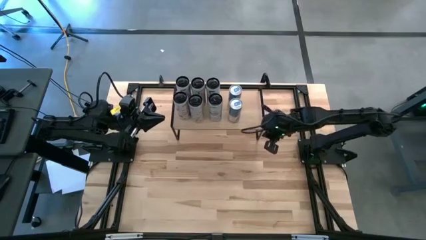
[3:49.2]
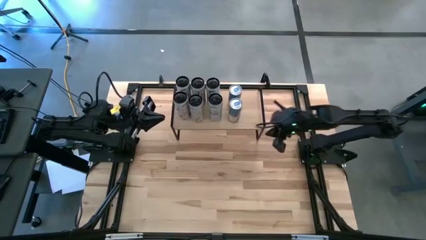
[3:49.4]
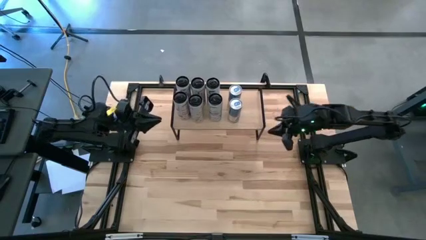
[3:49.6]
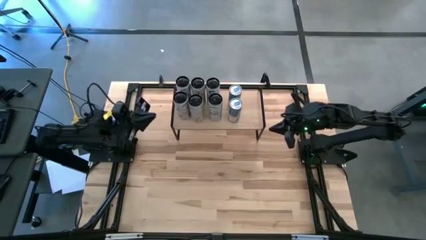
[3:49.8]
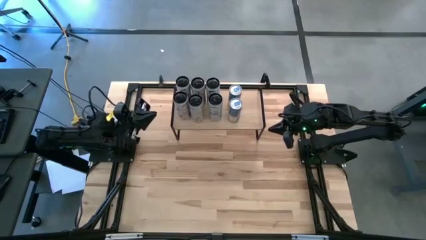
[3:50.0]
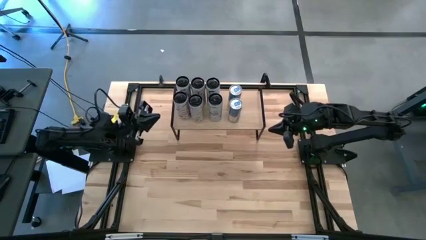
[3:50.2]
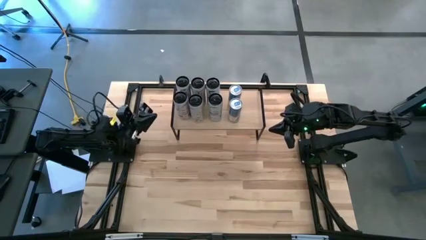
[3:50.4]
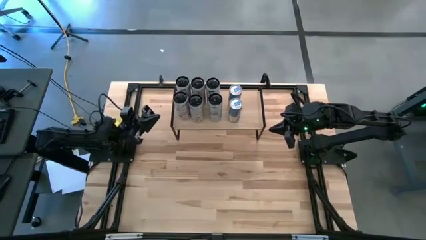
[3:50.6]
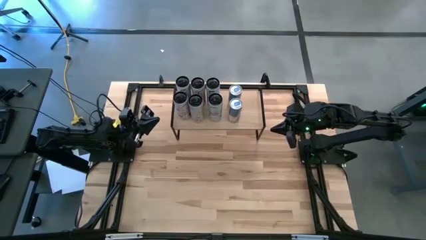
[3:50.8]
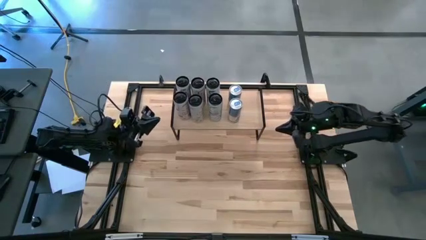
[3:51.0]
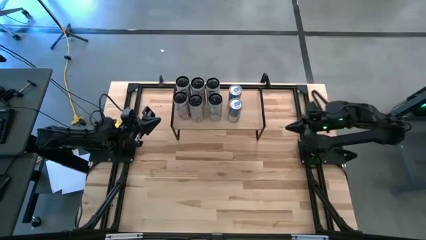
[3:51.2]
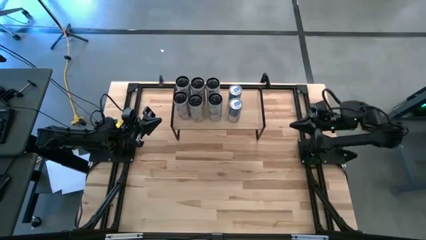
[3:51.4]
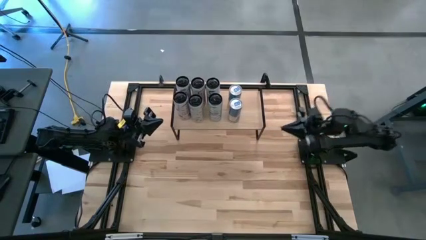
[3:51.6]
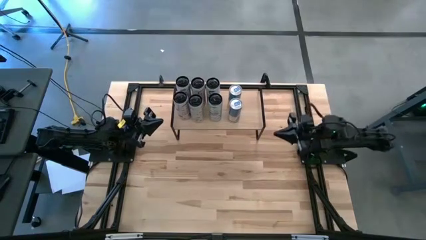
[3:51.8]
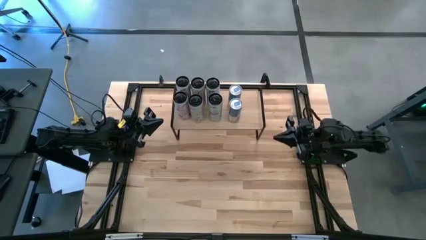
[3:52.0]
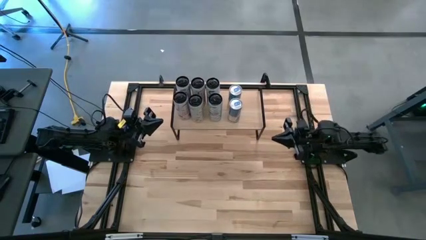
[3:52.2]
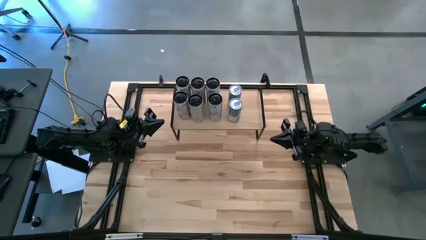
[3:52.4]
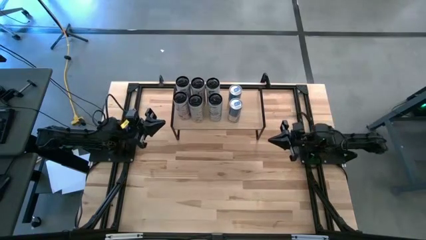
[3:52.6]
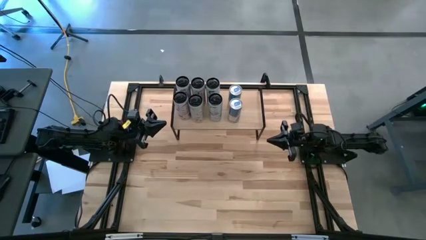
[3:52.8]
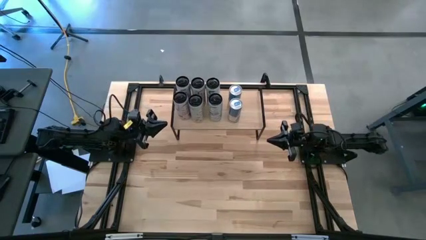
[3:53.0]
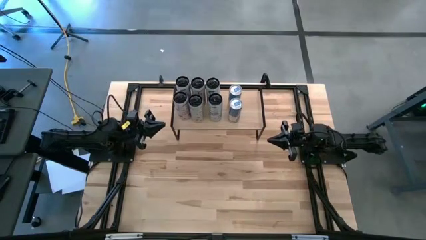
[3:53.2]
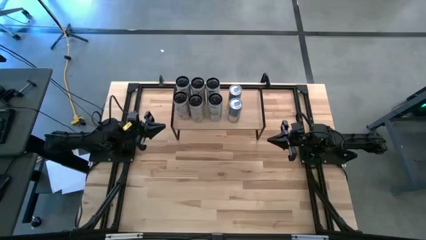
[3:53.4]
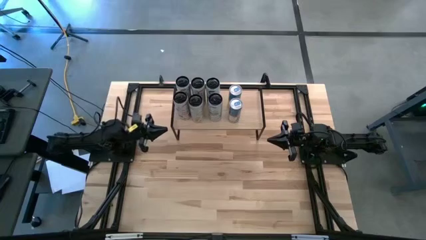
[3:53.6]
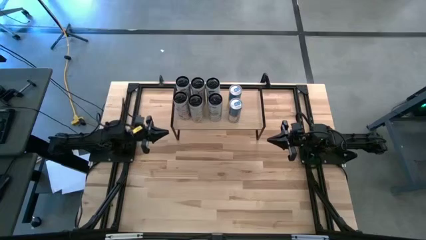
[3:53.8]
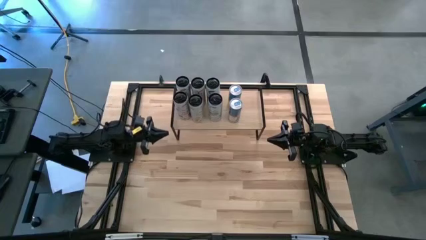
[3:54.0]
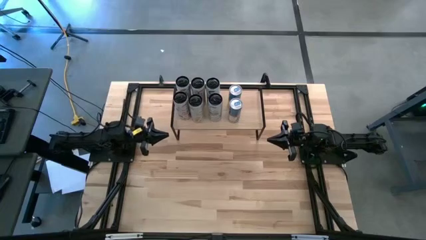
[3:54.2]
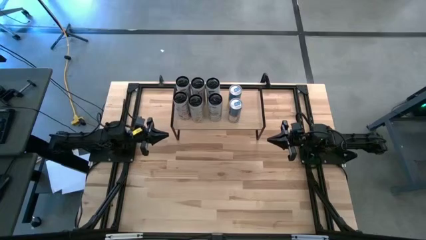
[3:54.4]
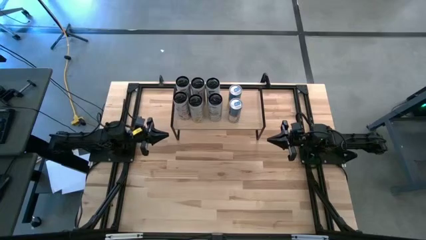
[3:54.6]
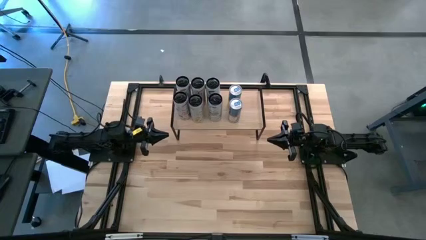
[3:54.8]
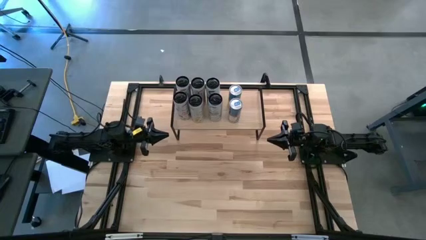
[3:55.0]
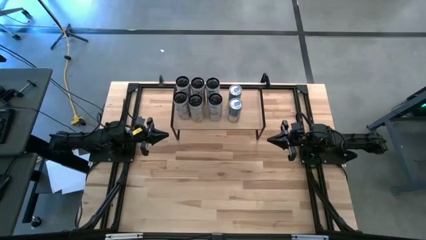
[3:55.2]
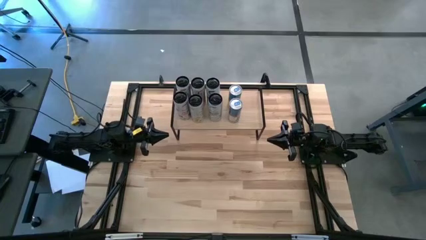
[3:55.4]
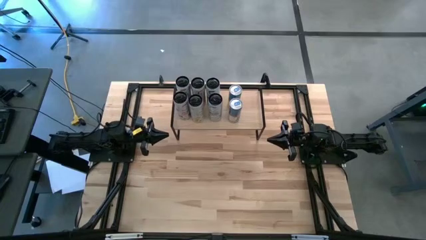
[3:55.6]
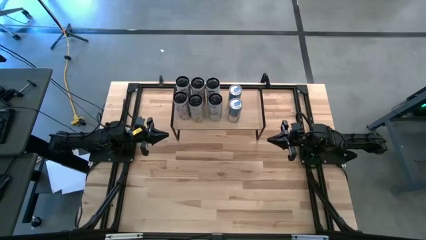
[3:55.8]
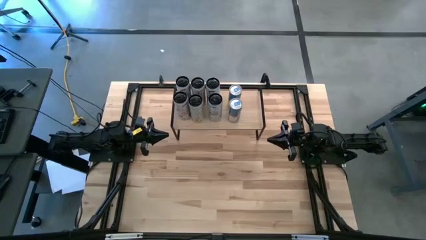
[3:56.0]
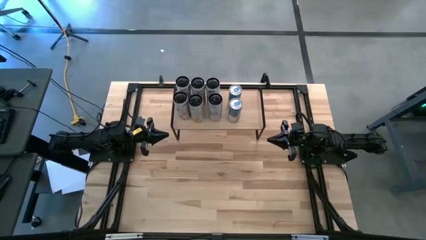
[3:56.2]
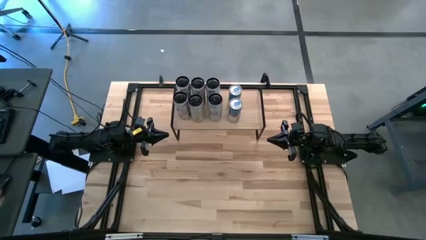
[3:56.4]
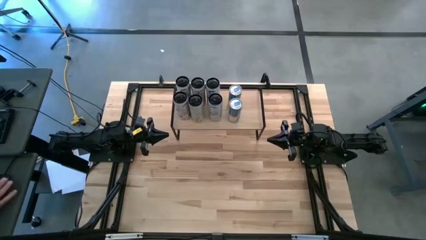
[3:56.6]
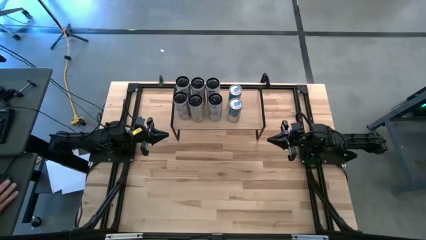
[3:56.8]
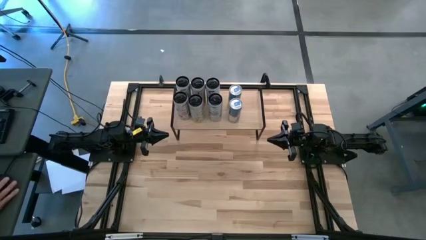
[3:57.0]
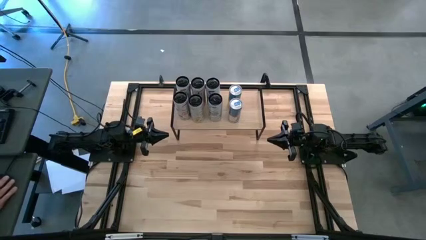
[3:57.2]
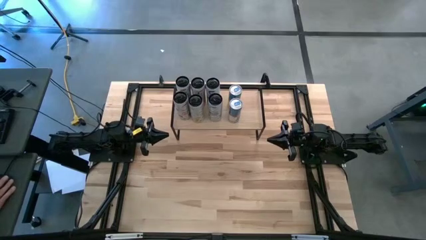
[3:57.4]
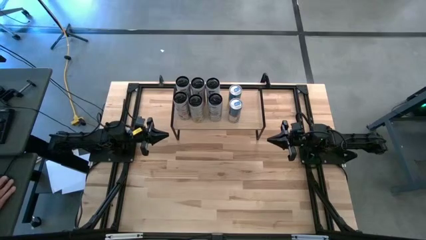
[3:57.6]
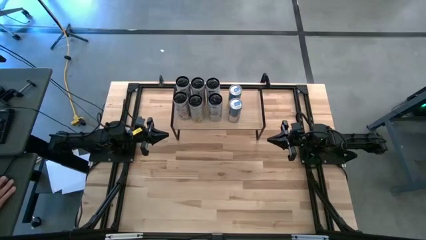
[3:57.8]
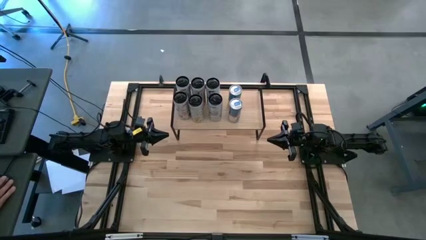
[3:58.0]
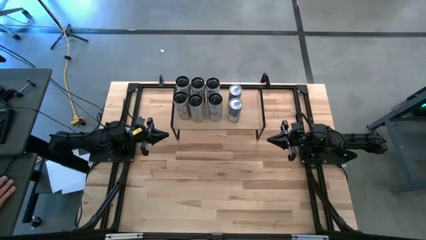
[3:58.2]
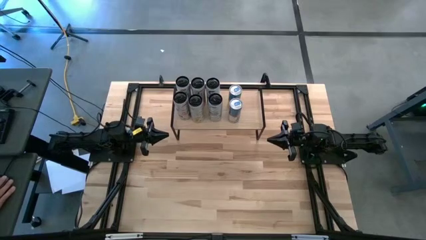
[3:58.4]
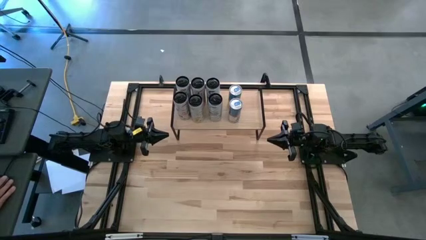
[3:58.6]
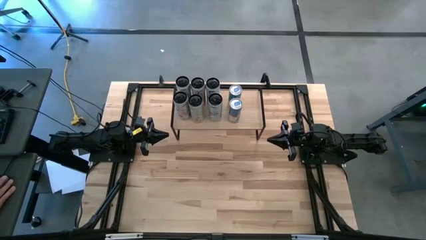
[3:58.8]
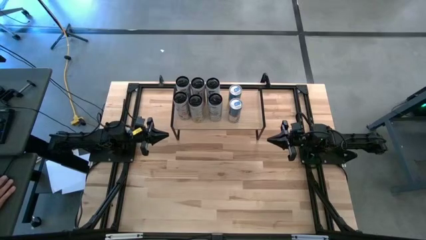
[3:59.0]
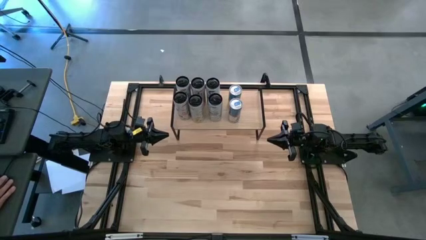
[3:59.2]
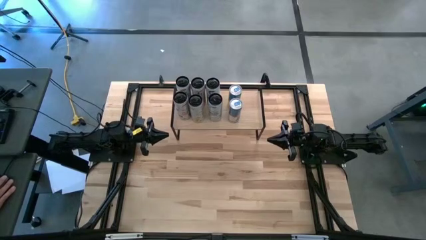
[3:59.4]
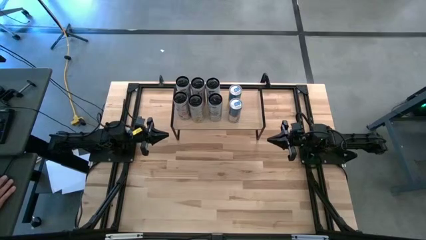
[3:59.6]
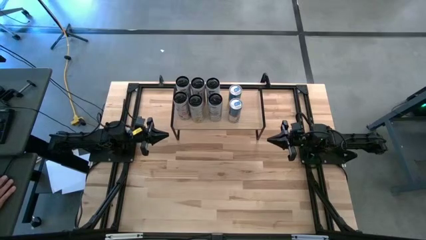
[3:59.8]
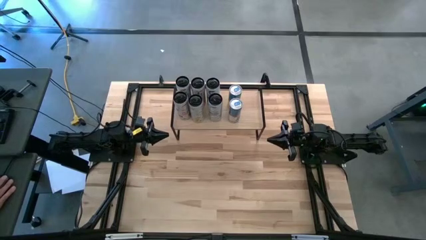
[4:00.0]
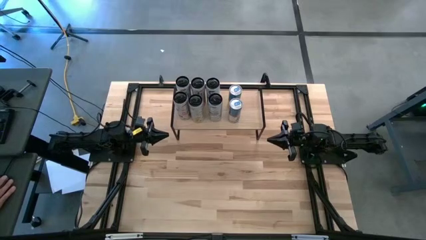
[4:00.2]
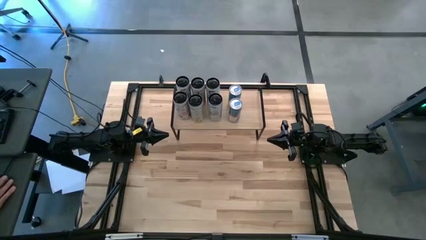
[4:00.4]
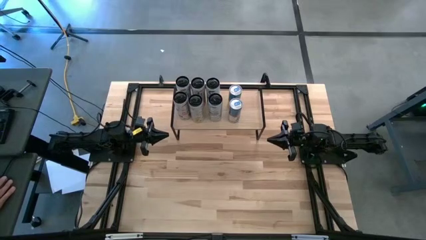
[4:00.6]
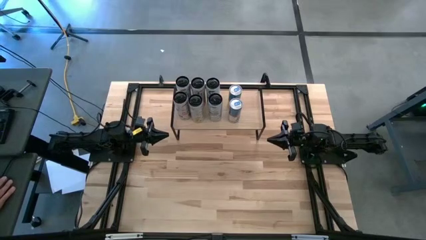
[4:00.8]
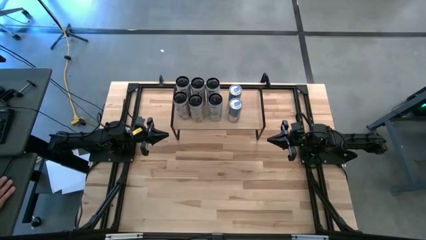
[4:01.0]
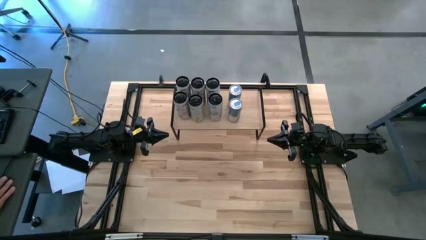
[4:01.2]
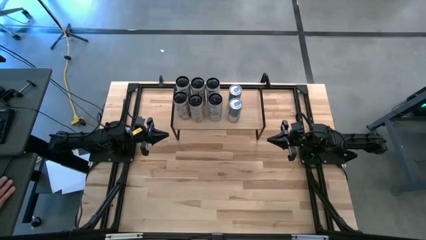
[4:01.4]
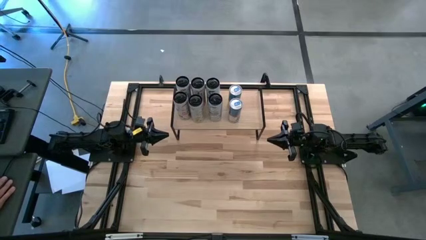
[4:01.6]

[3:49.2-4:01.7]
Task: Place canned beverage on shelf
Return to Home Position
